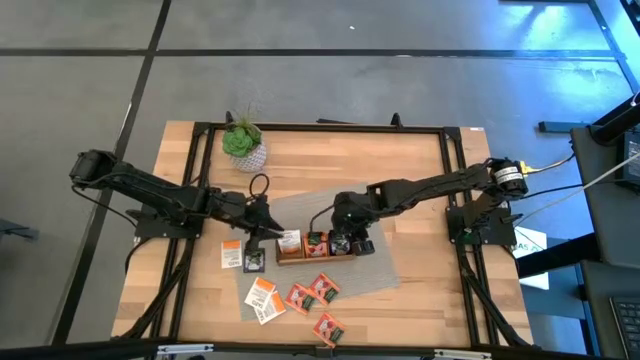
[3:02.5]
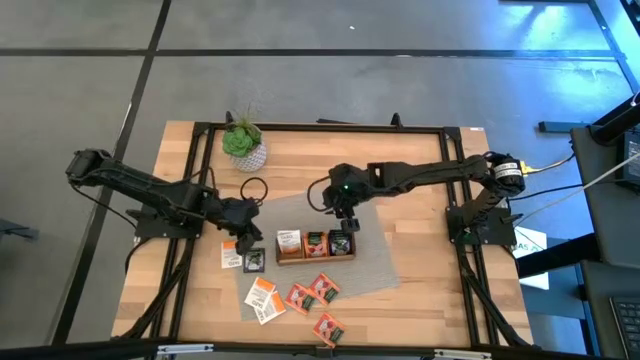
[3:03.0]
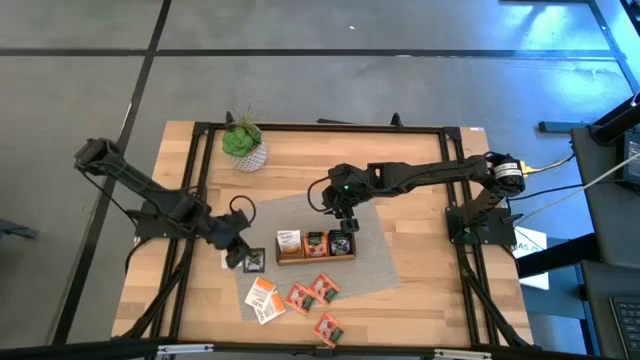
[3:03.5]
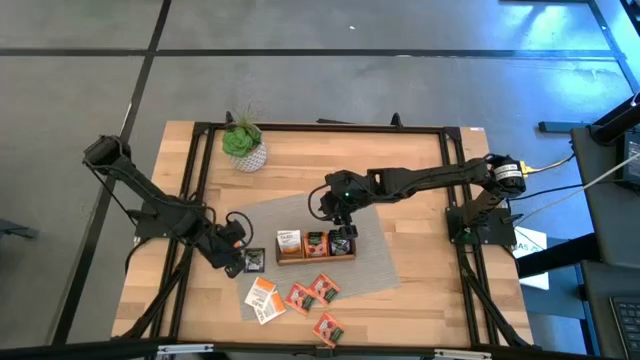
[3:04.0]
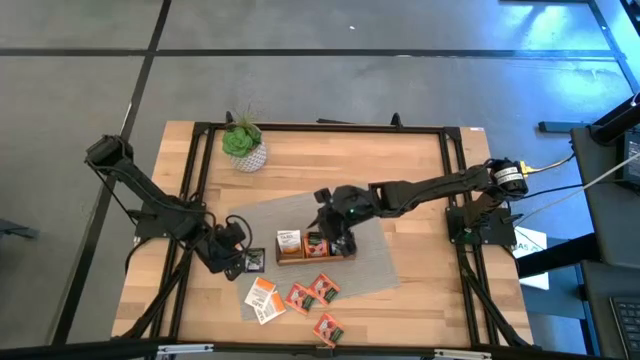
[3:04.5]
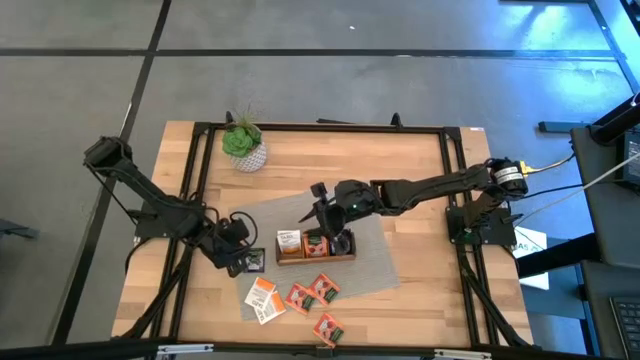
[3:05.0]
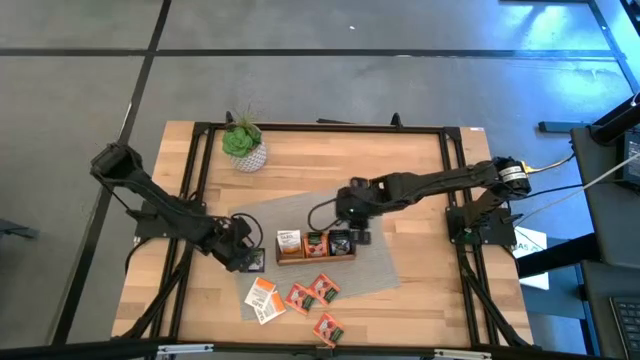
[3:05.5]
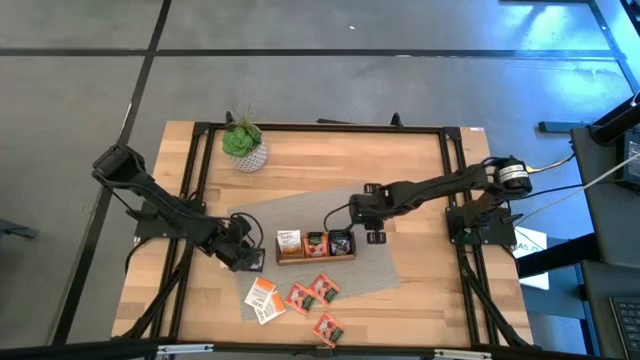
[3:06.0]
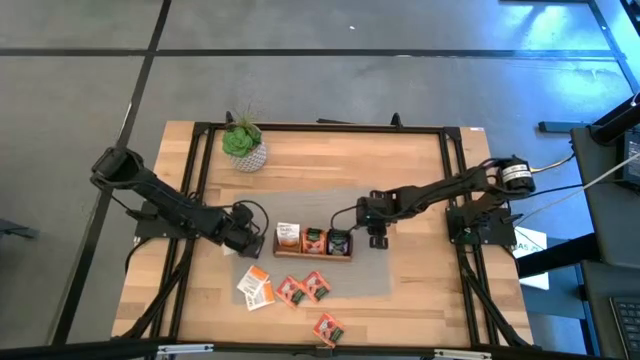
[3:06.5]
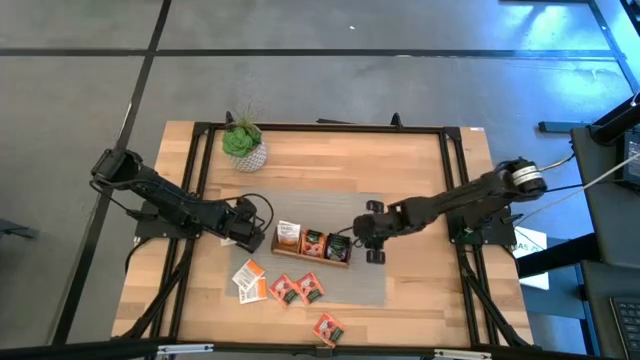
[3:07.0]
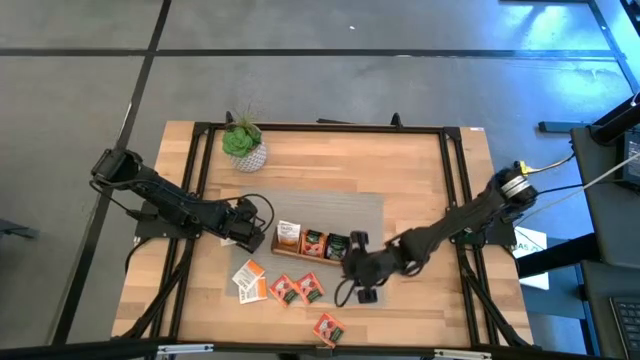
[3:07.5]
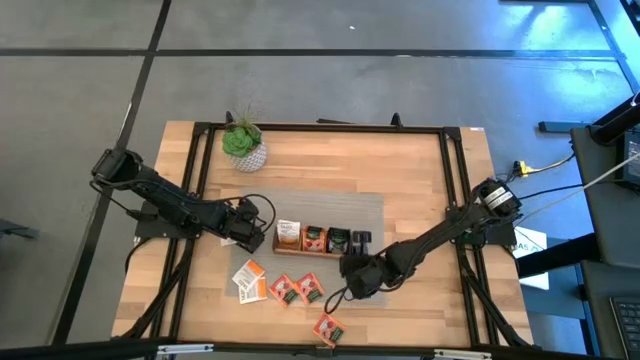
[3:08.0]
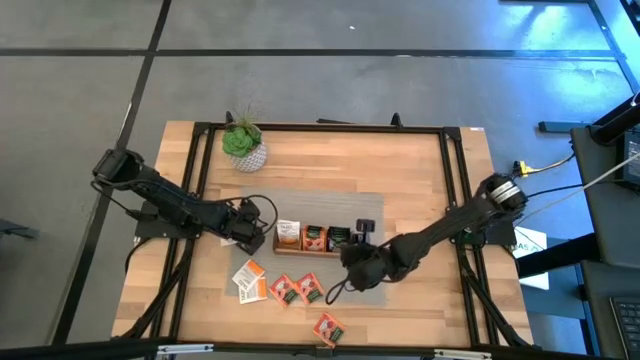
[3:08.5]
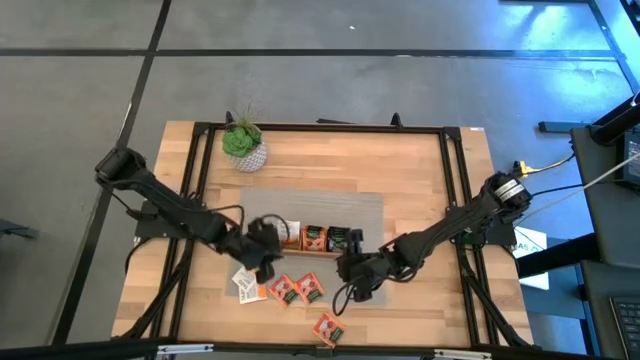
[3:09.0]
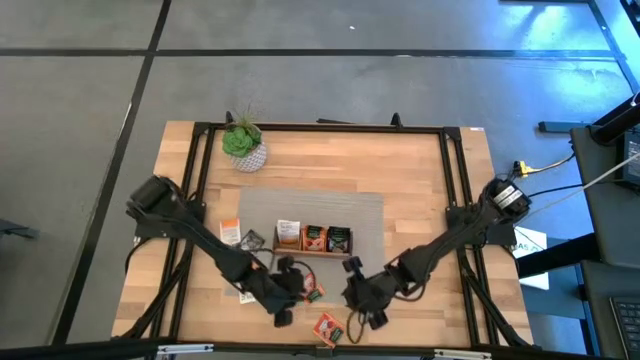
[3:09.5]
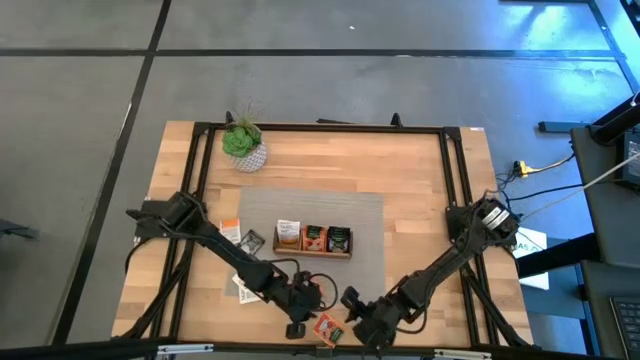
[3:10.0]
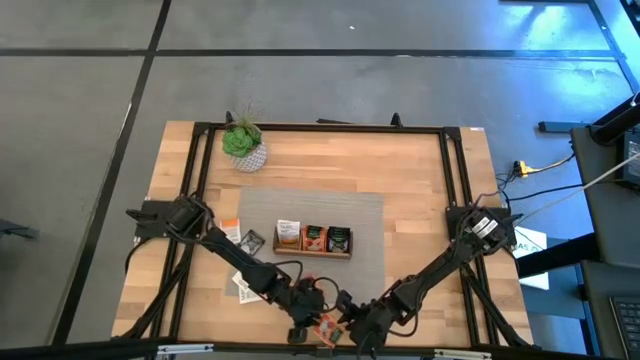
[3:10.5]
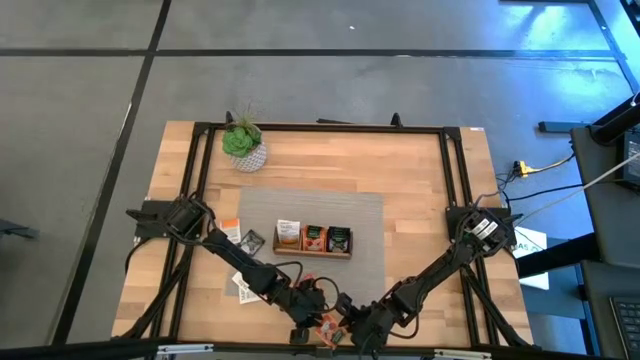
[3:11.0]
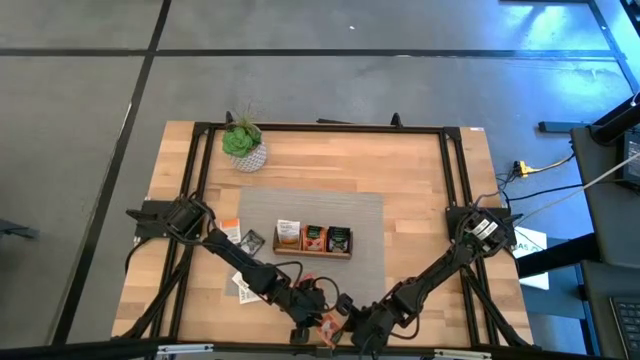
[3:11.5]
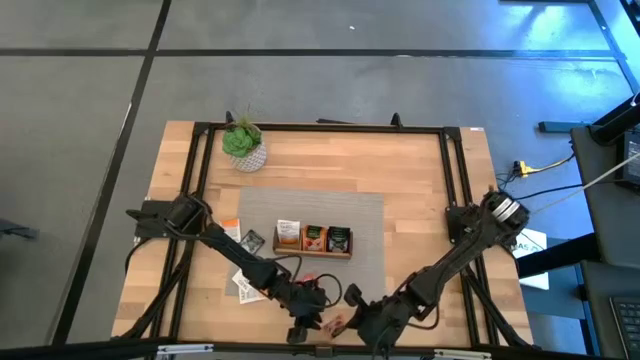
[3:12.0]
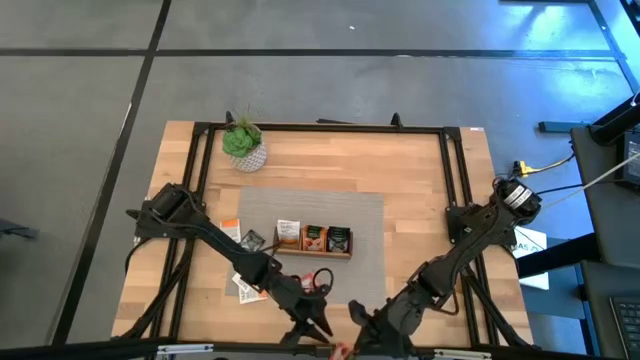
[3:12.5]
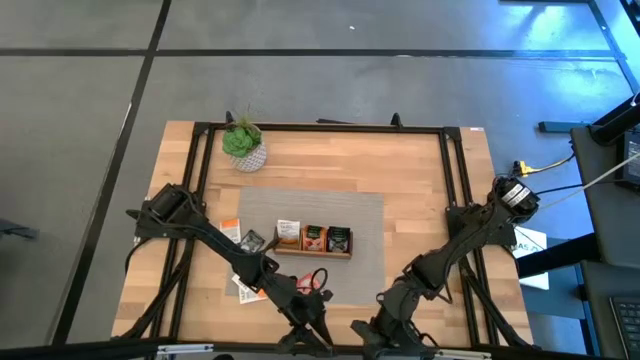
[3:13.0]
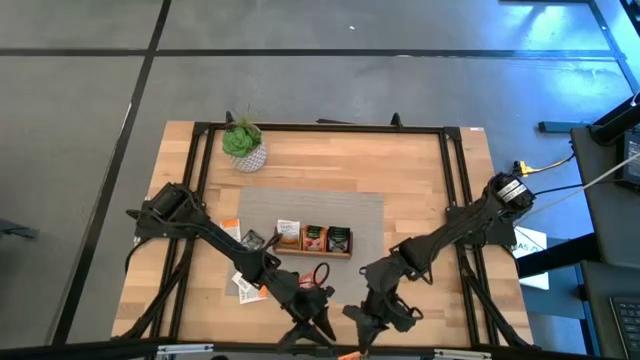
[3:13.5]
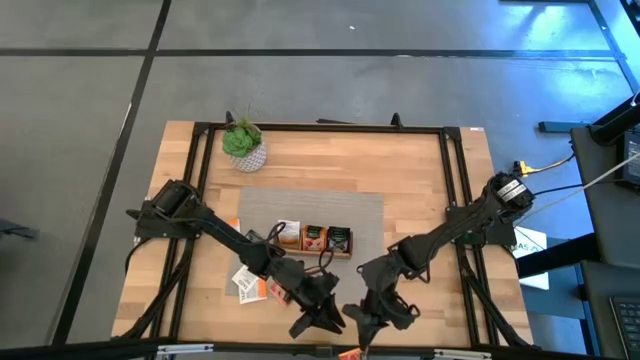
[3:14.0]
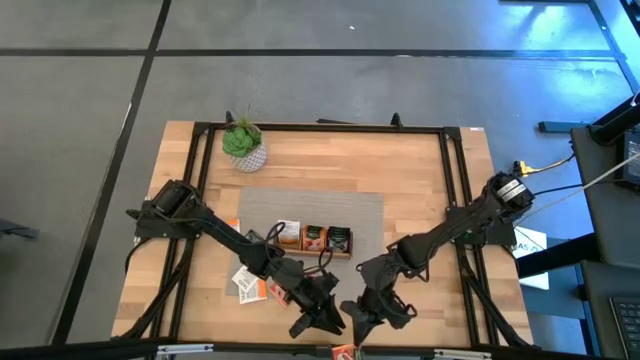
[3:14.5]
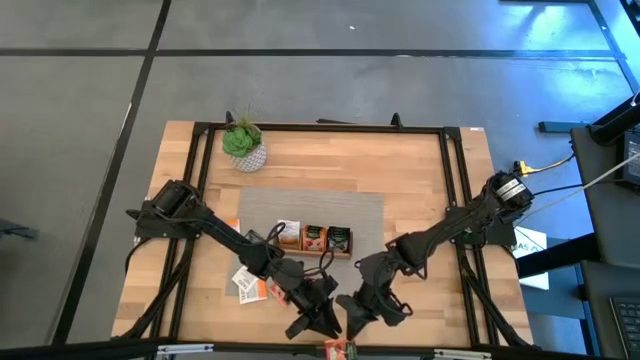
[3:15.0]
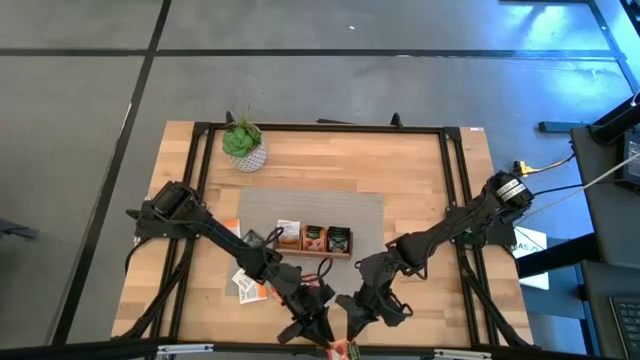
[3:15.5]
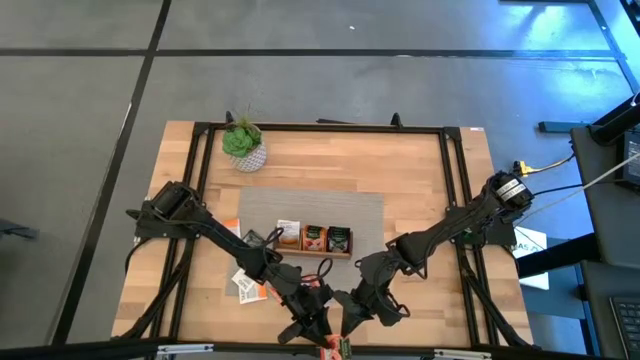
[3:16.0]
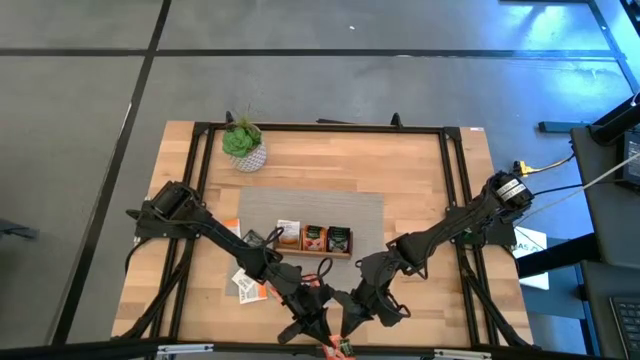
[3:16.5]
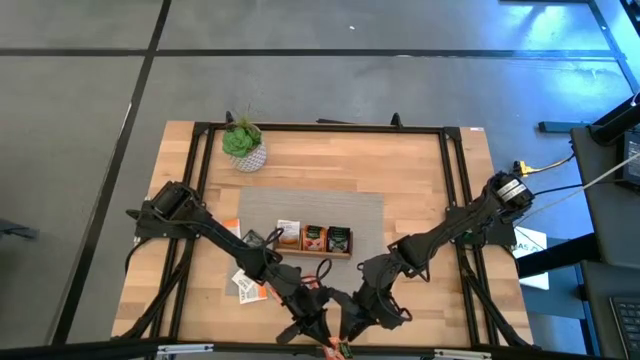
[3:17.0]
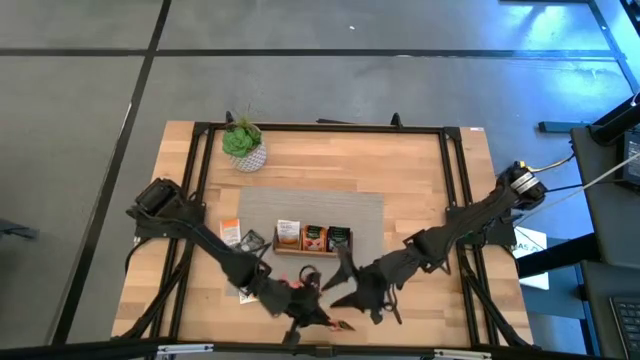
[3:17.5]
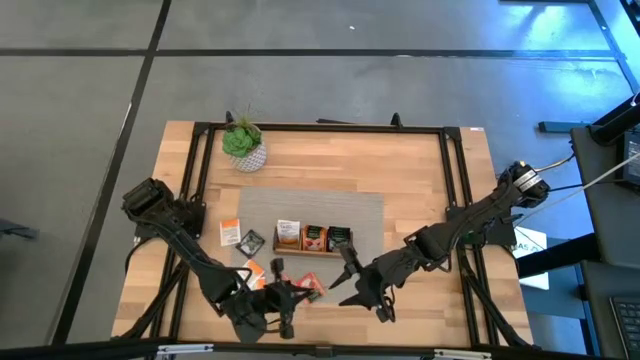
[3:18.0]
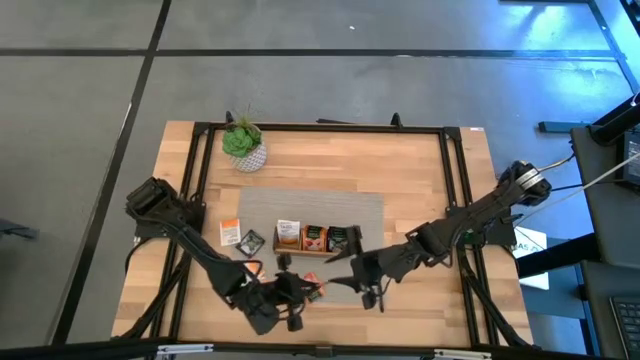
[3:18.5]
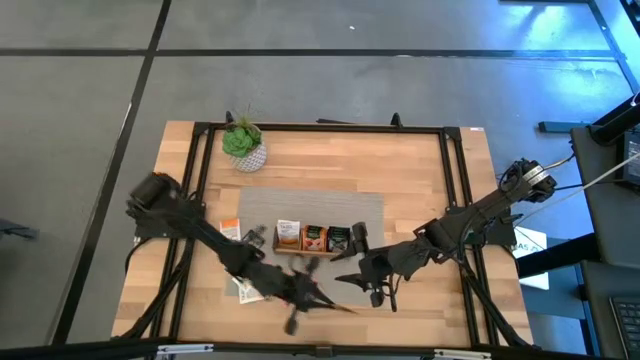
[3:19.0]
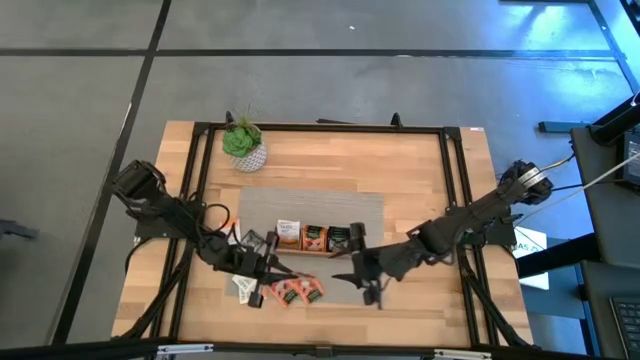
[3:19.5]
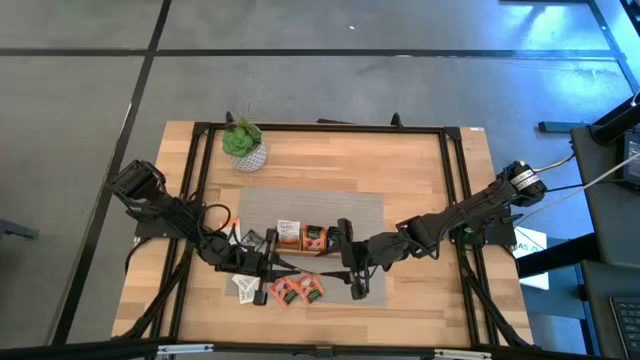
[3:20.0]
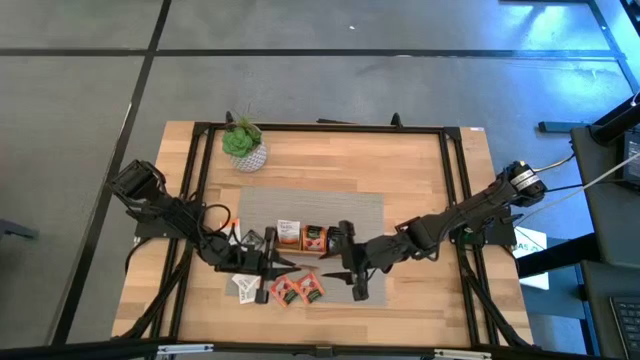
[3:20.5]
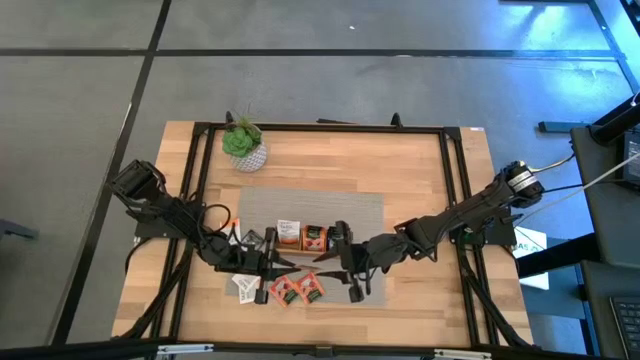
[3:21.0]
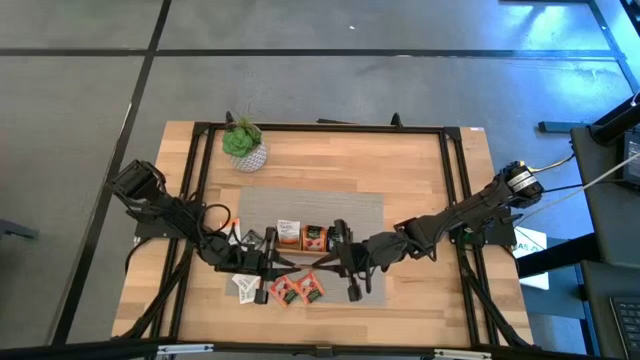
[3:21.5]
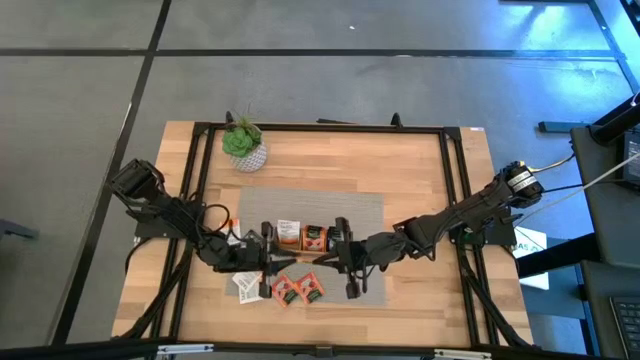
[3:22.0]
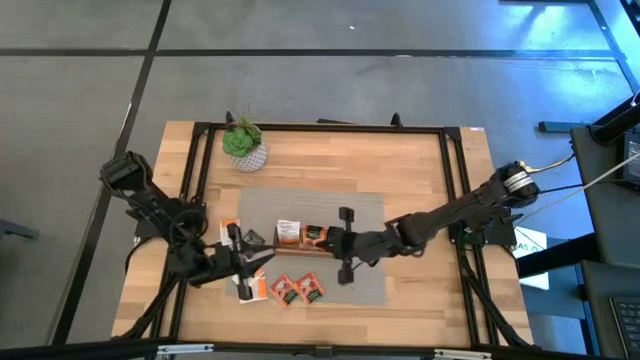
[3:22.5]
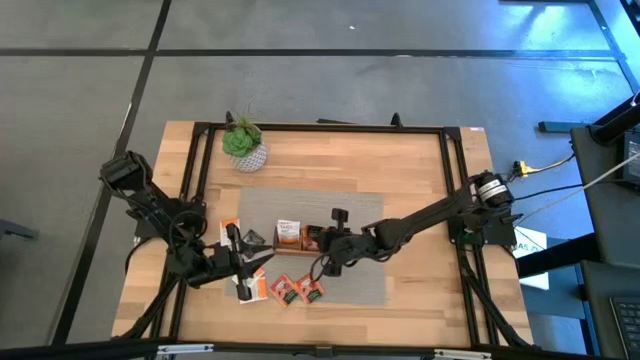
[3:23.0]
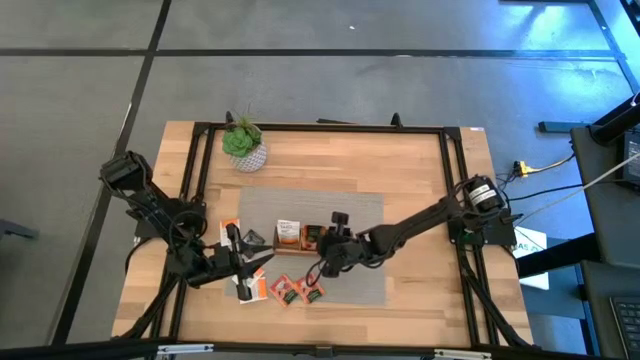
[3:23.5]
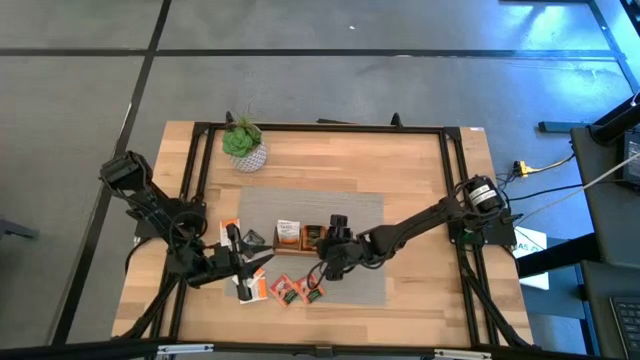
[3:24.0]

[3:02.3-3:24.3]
Task: Pick & Place Tea
Put the orange tea bag into the middle section of the wooden organizer
